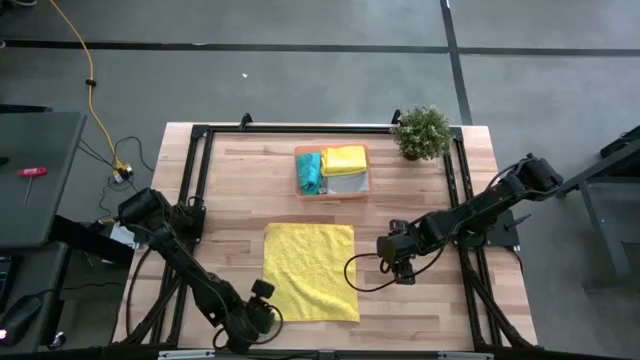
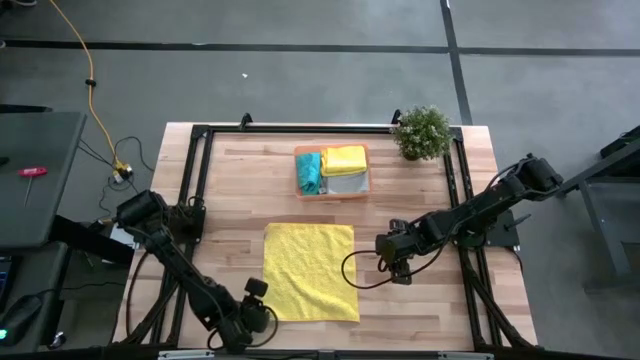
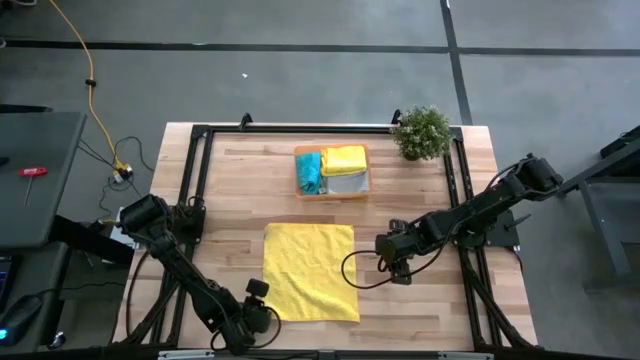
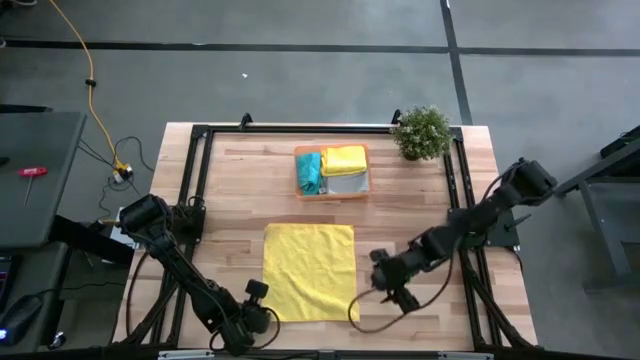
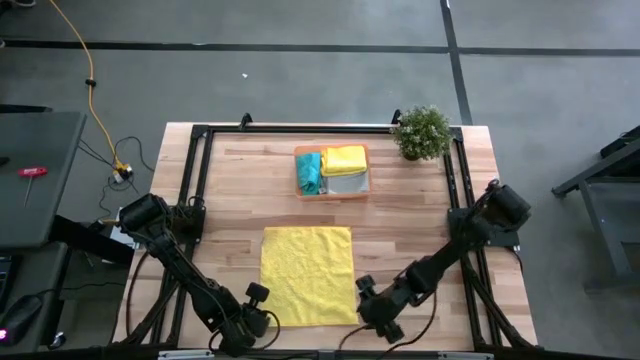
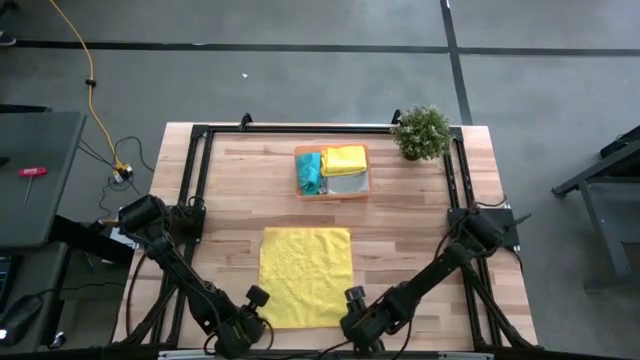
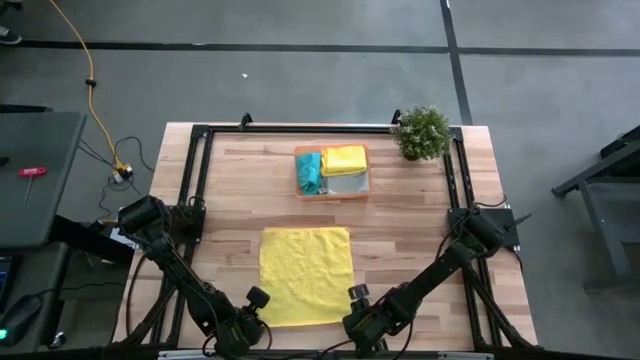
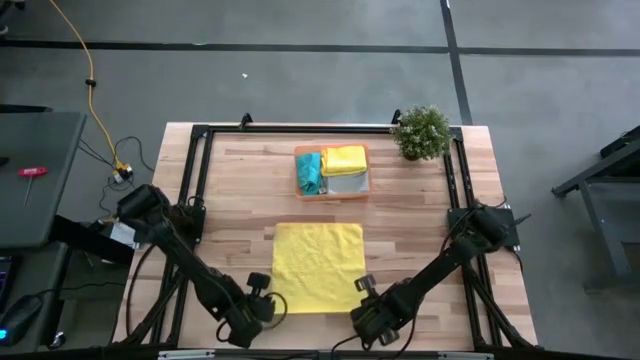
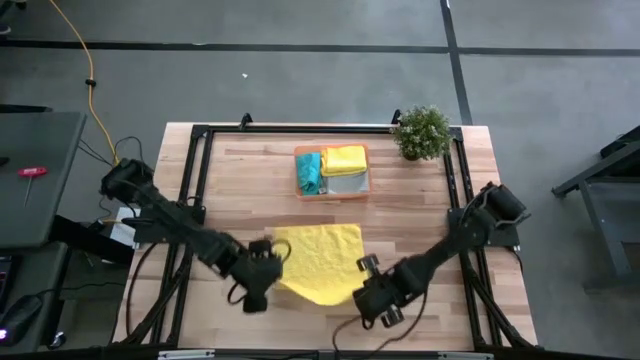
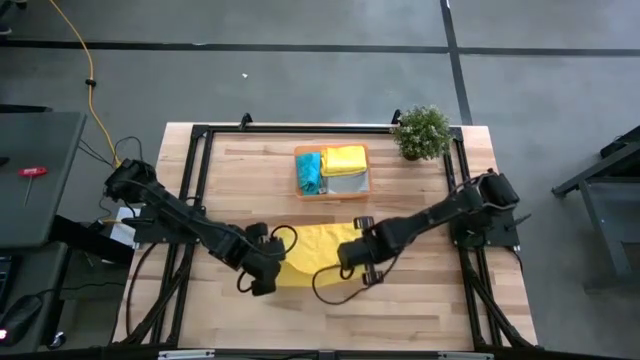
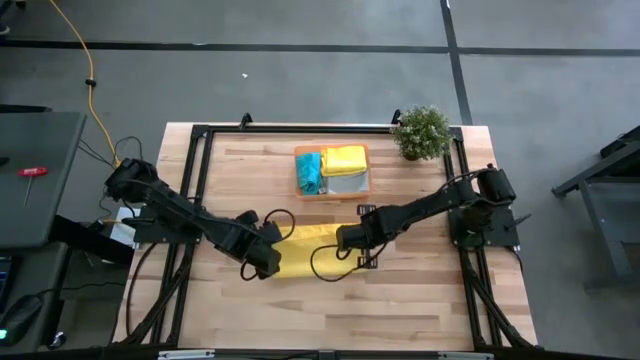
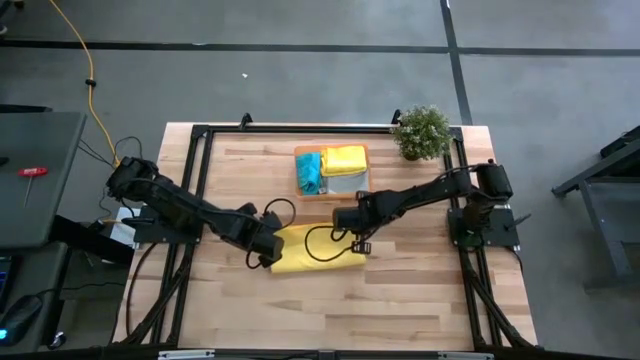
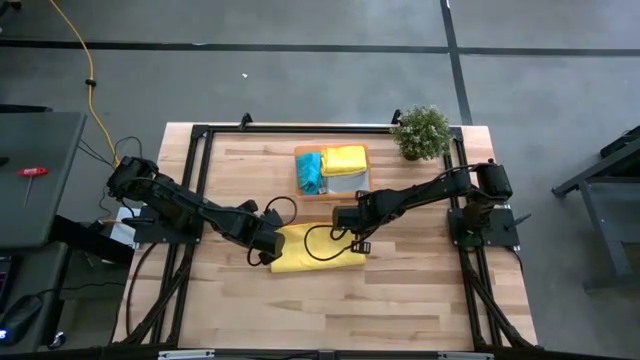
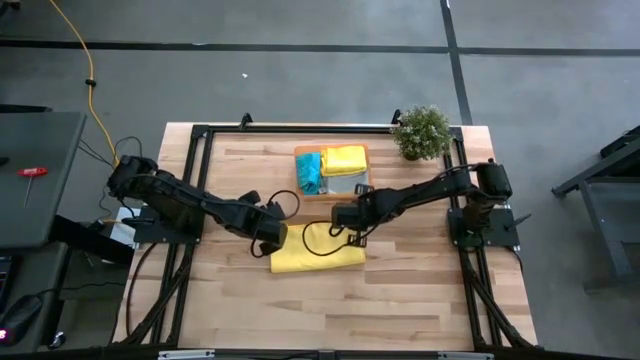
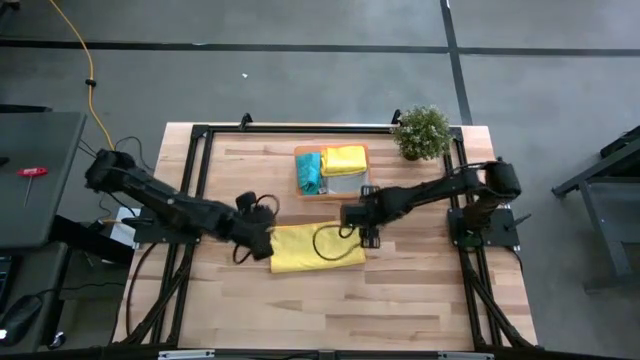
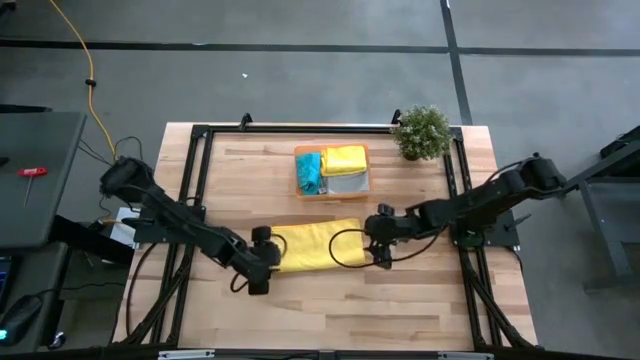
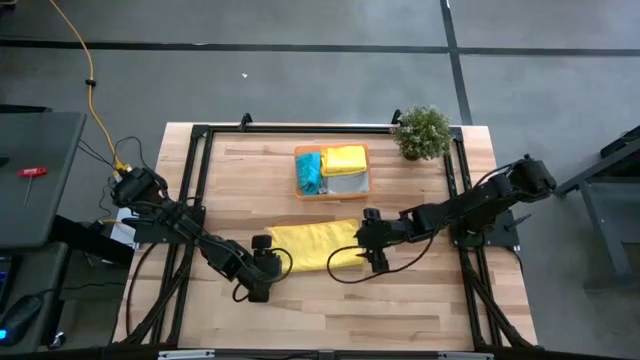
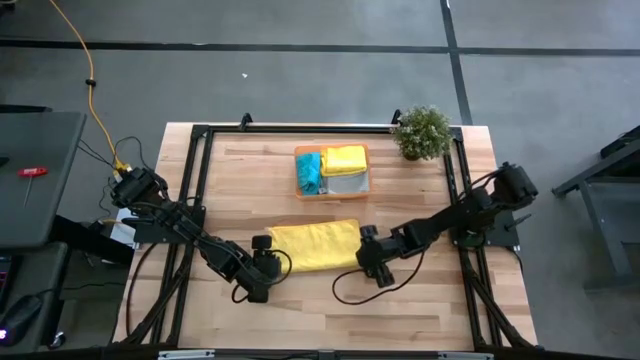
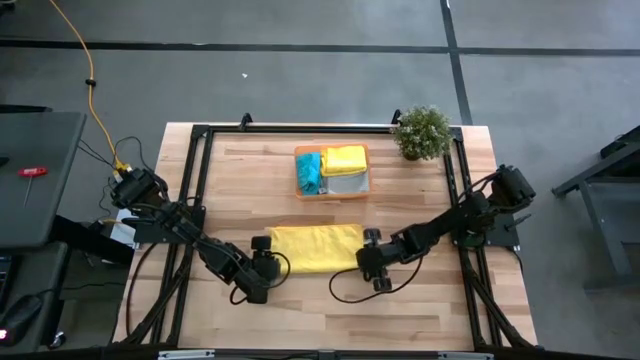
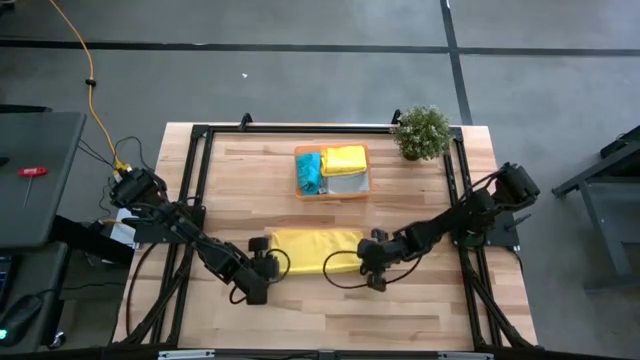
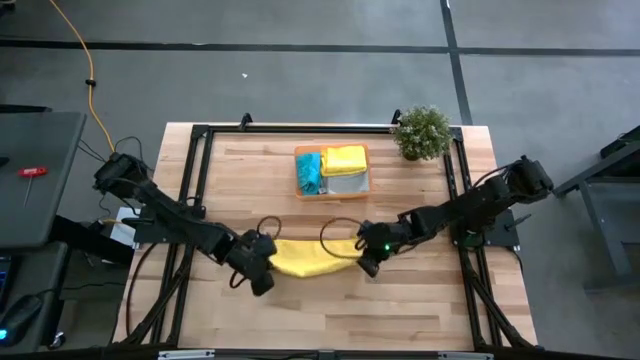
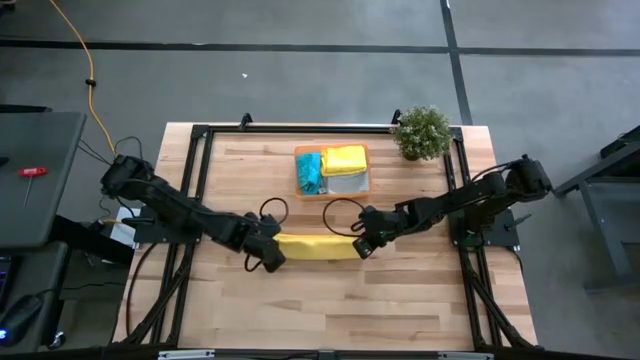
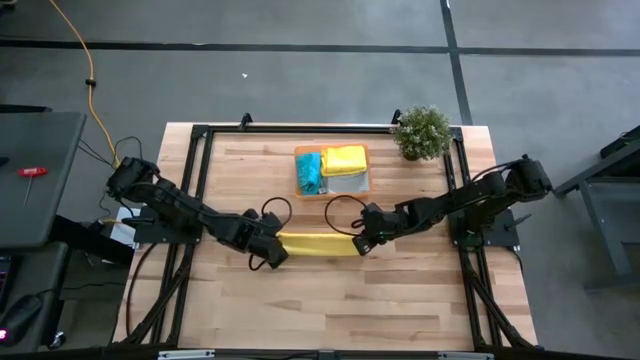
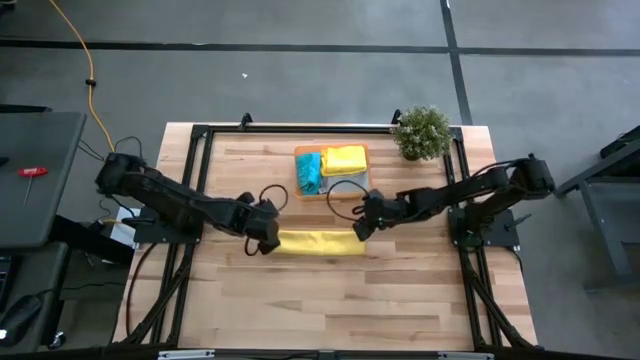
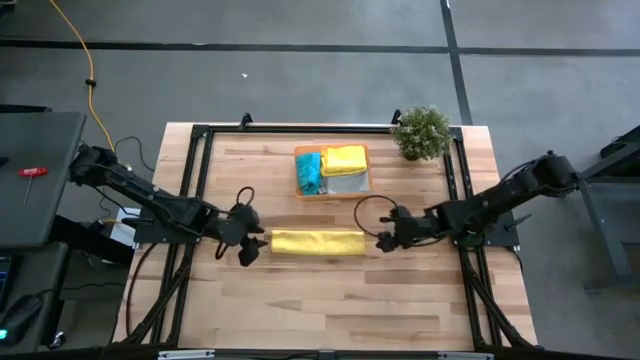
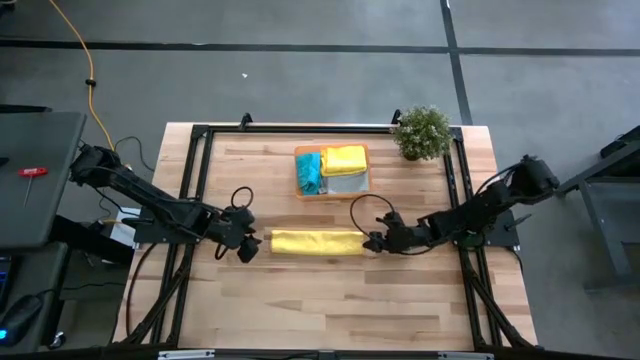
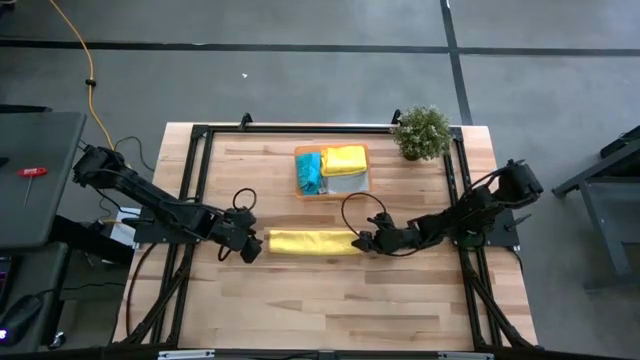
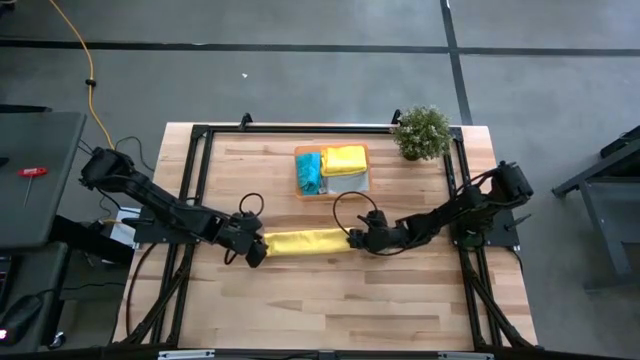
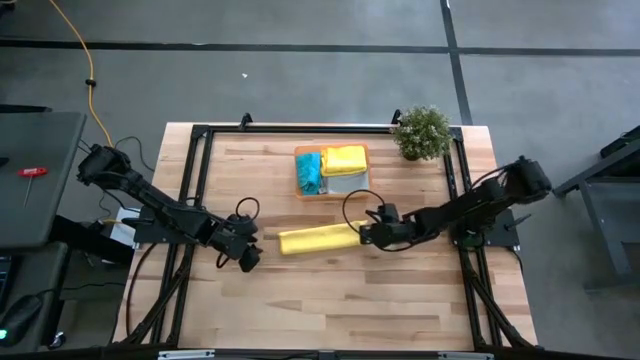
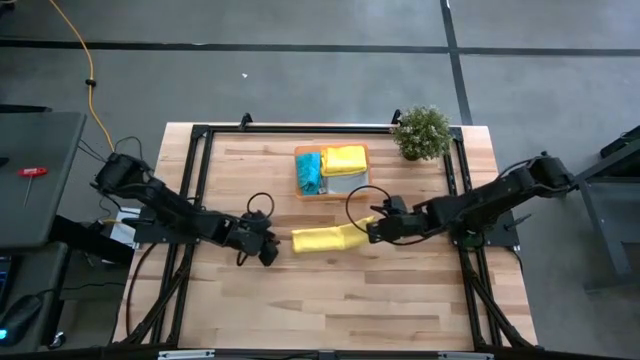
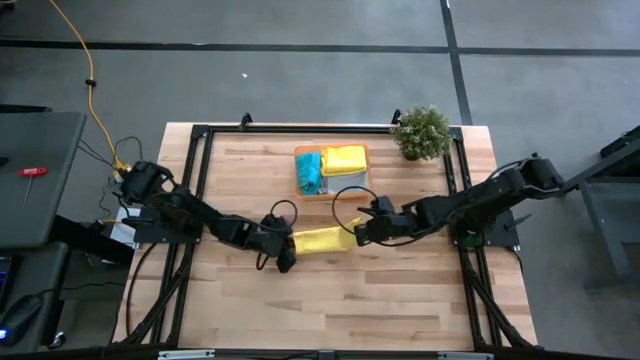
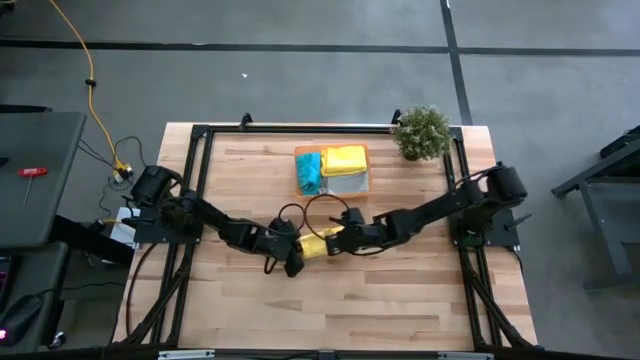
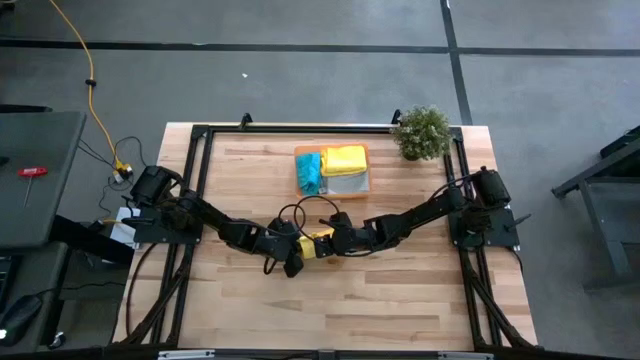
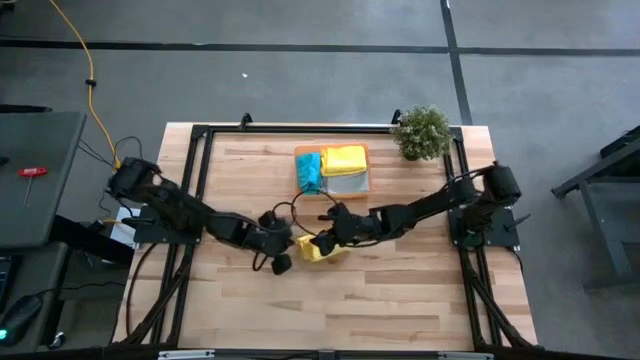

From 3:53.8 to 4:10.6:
Task: Fold microfiber towels
Fold the yellow towel

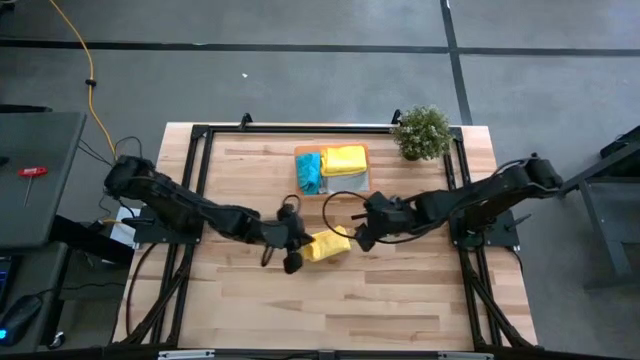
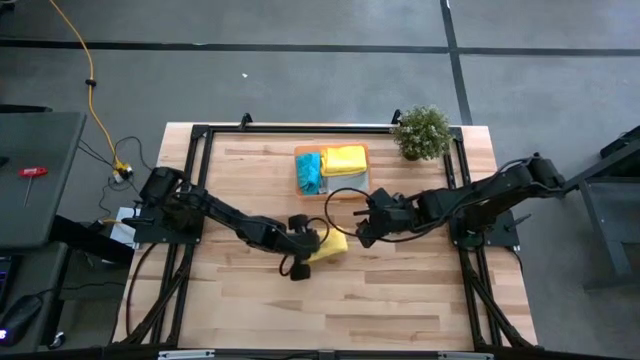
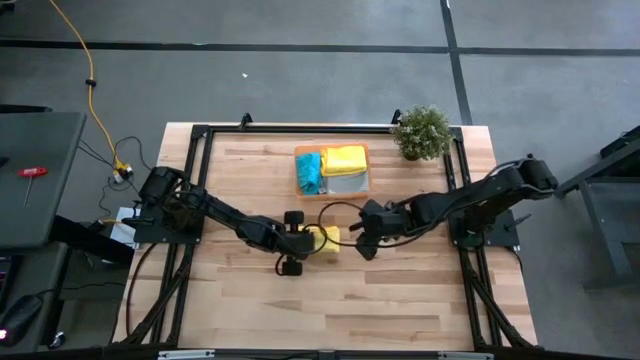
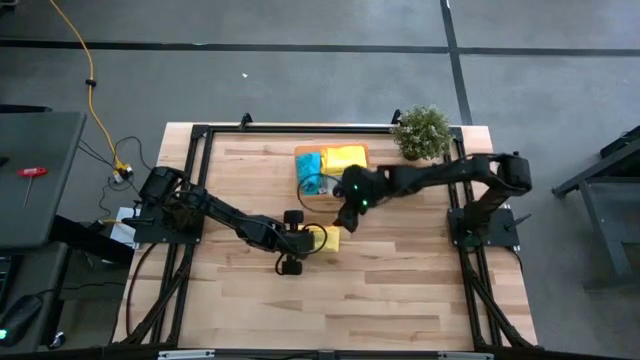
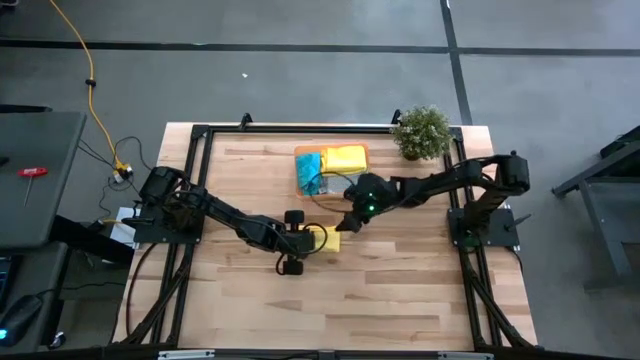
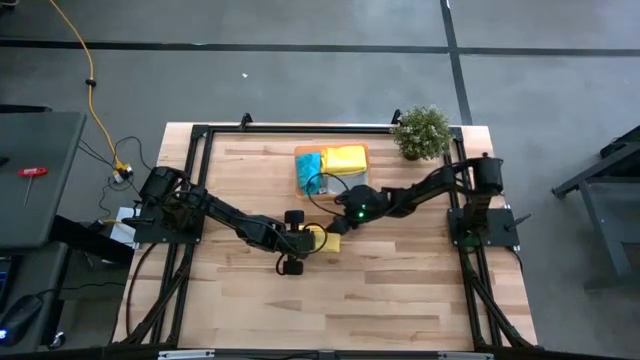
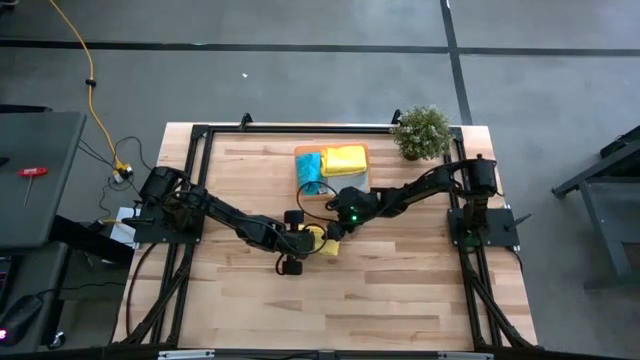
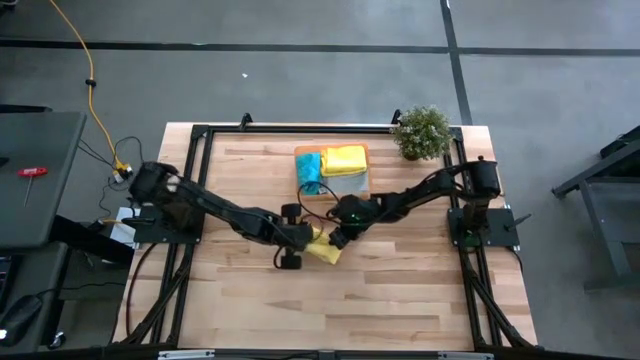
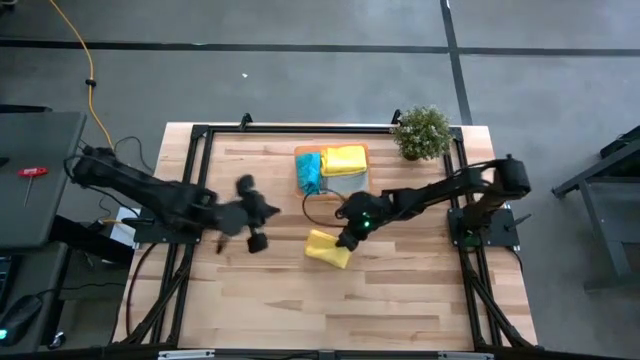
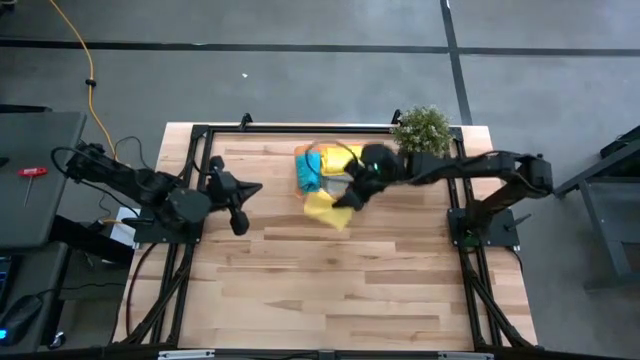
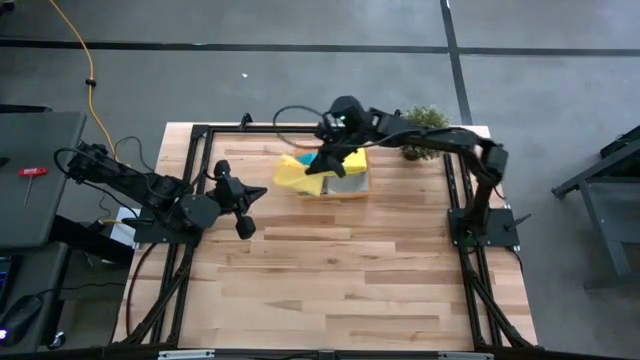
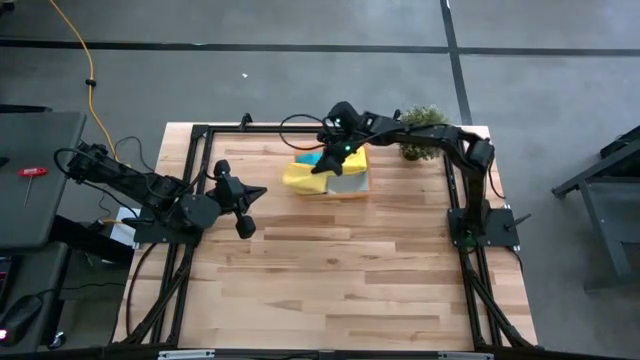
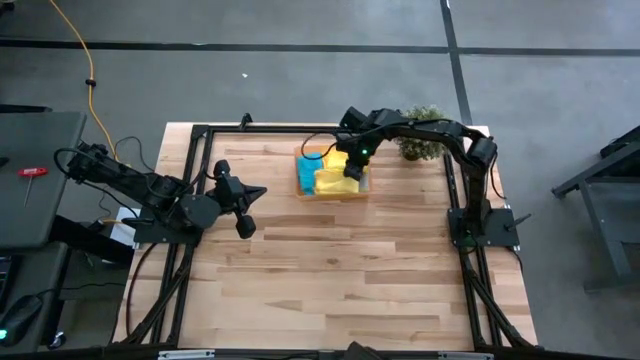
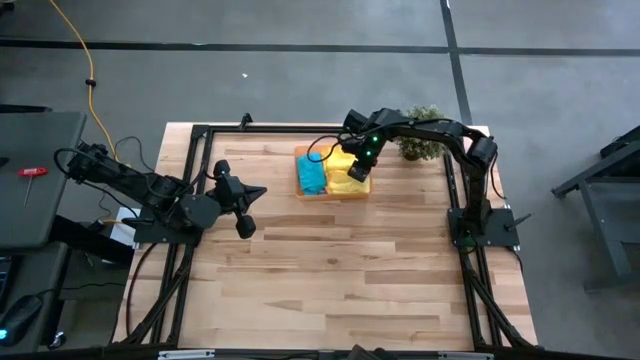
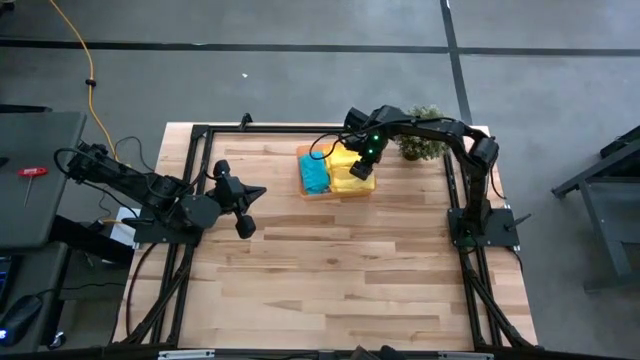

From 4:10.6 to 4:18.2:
Put the yellow towel into the bin
